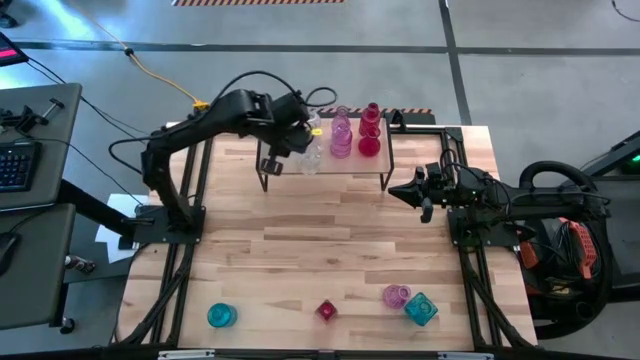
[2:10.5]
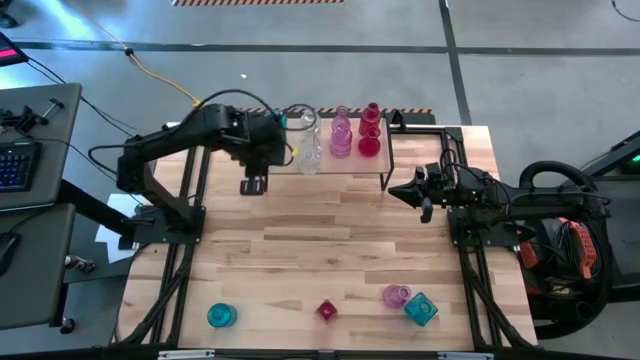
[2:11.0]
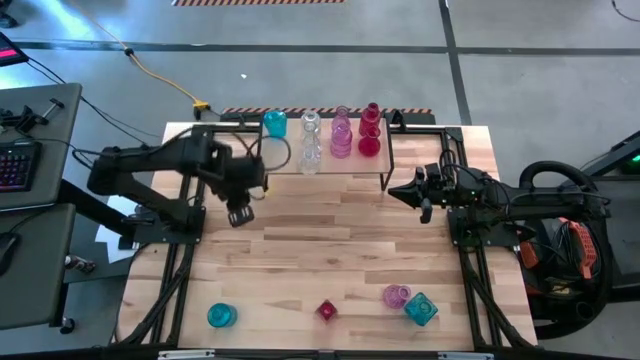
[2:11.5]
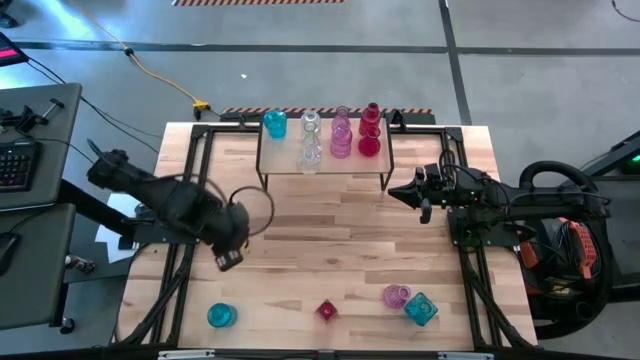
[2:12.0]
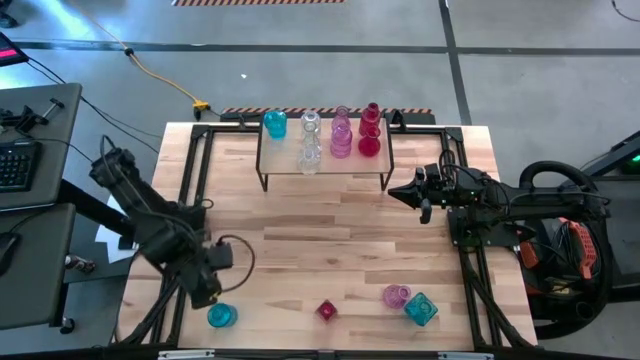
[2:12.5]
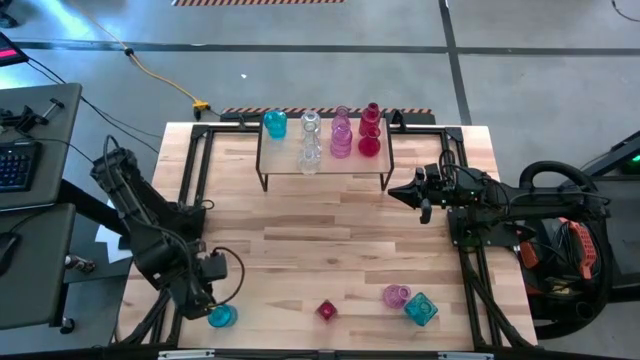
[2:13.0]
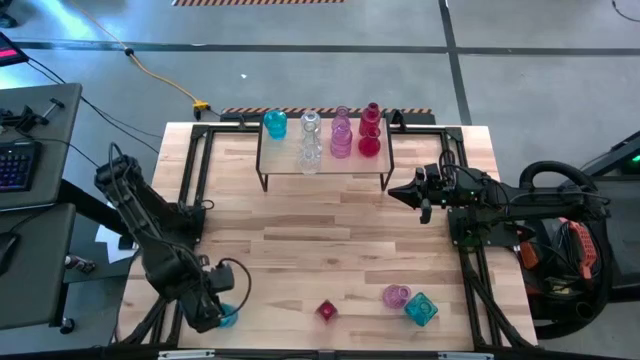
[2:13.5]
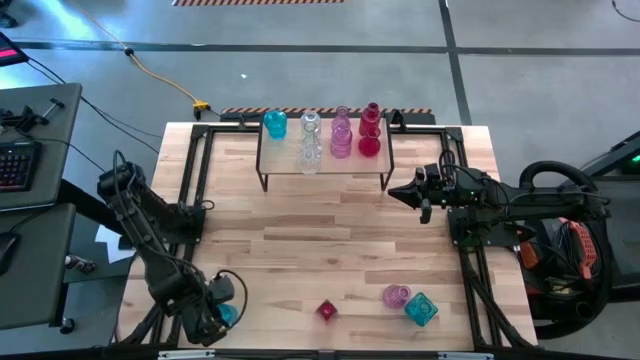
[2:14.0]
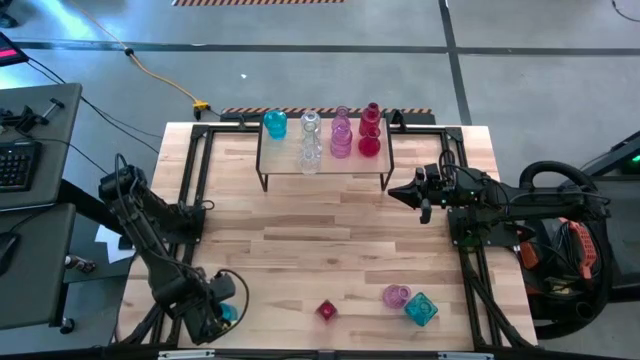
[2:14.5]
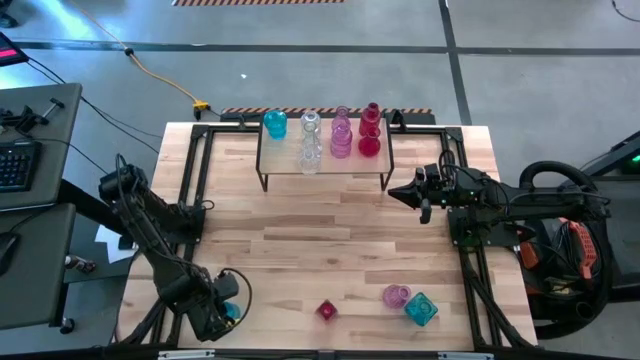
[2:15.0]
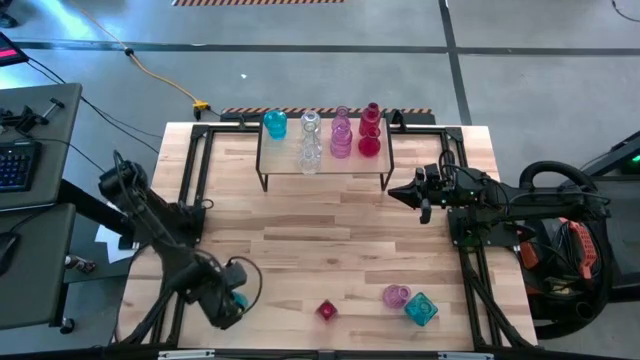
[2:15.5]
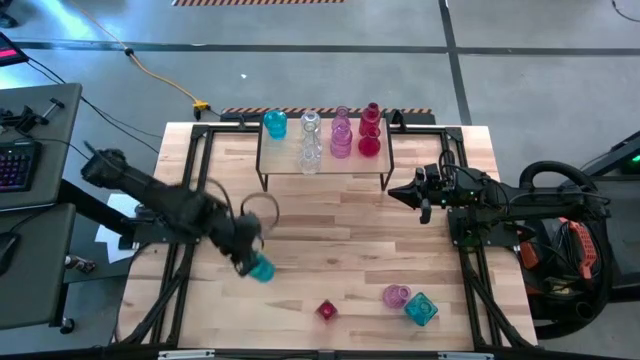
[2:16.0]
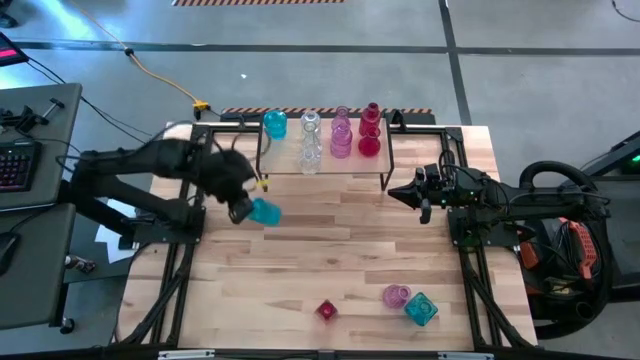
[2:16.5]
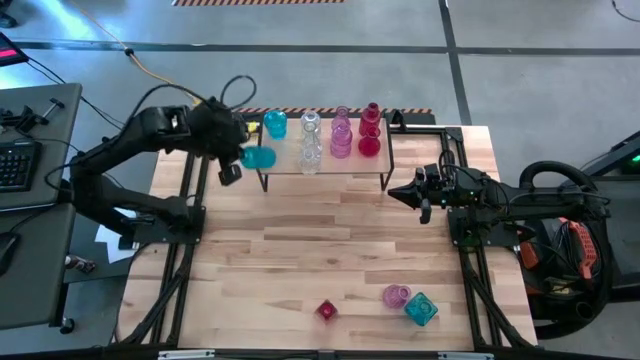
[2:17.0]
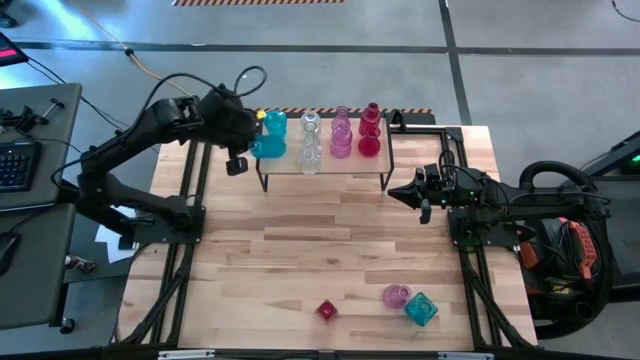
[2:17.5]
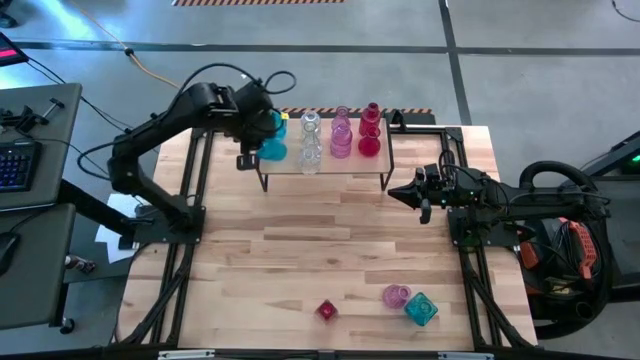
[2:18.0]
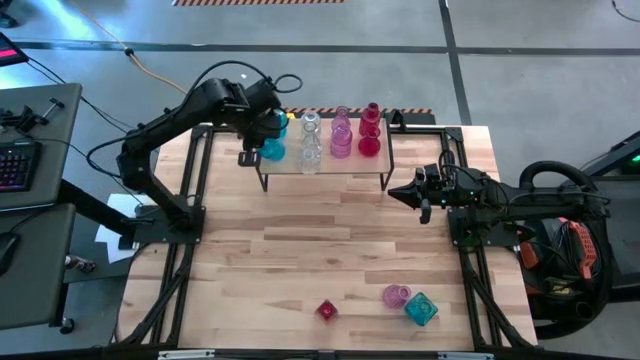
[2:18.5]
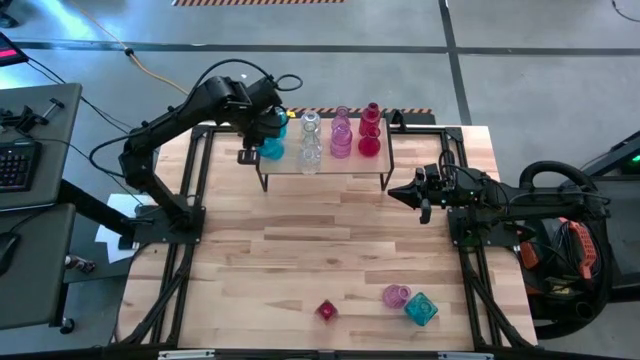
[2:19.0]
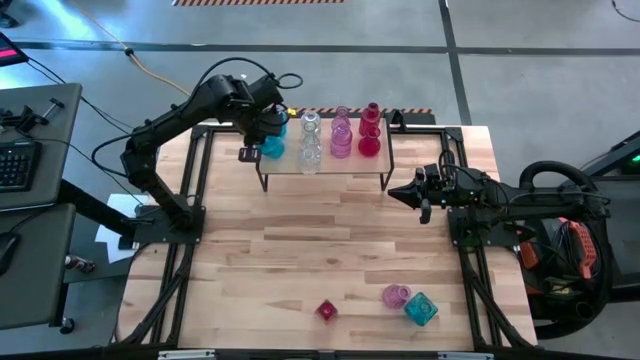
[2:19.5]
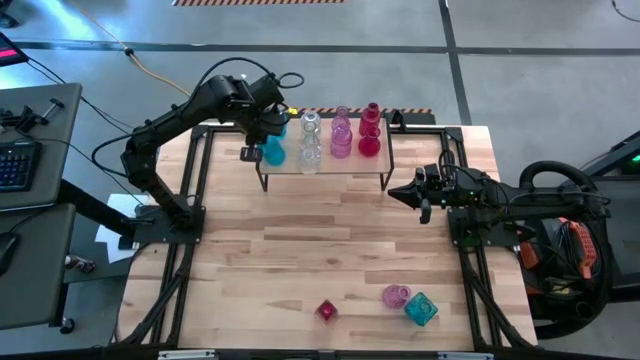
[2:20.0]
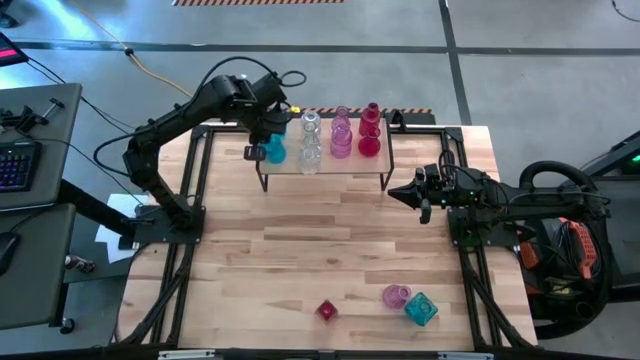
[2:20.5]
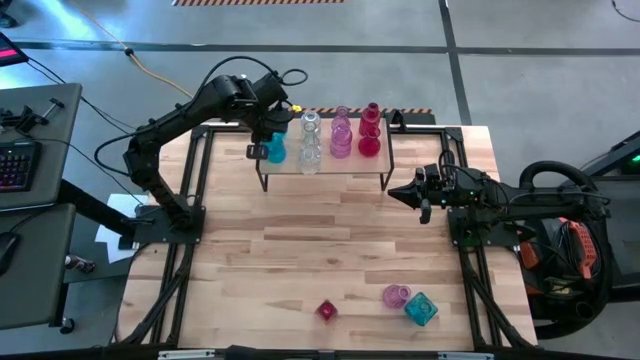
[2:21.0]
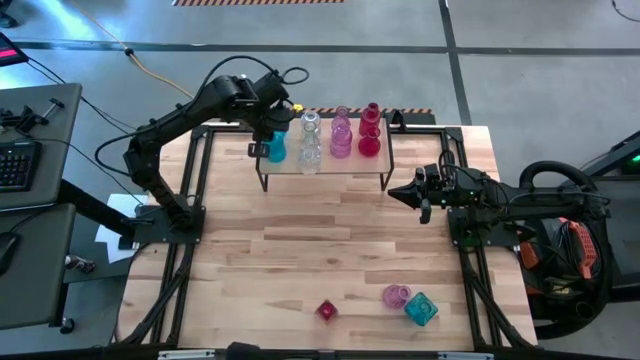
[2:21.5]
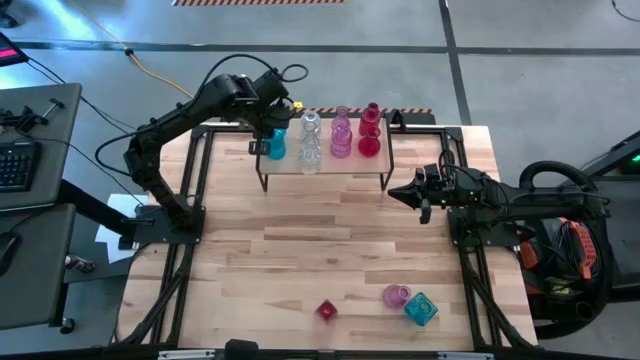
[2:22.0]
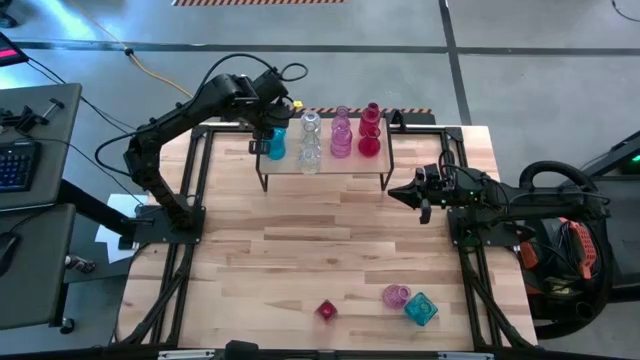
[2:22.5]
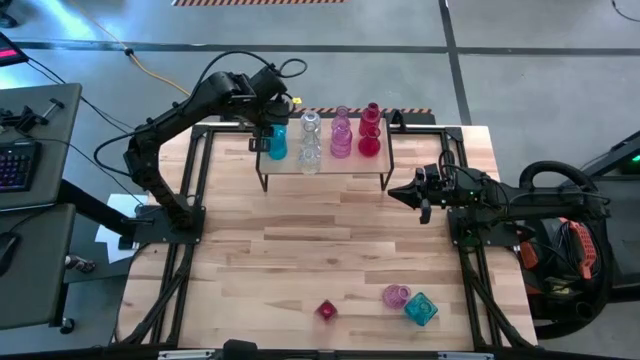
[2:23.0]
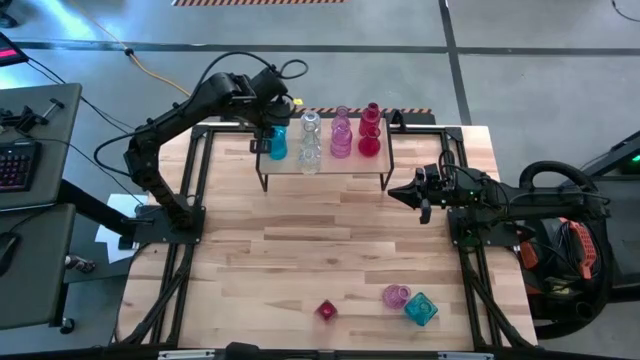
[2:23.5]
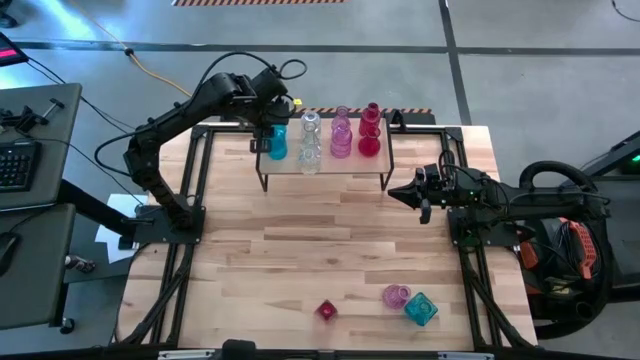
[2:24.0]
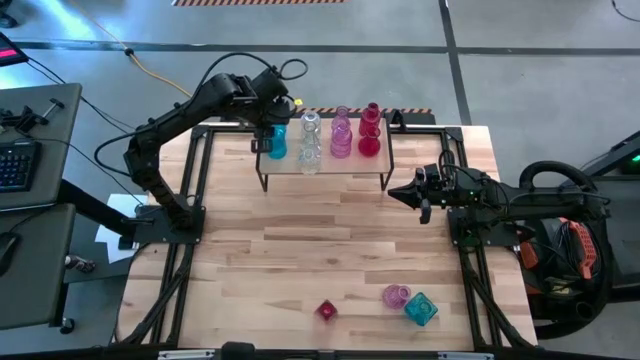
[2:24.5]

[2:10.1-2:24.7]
Task: sort vases onto shelf
Put the left blue vase on the shelf aligned with the other blue vase

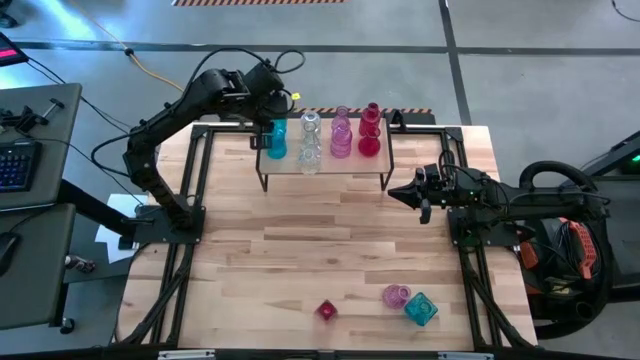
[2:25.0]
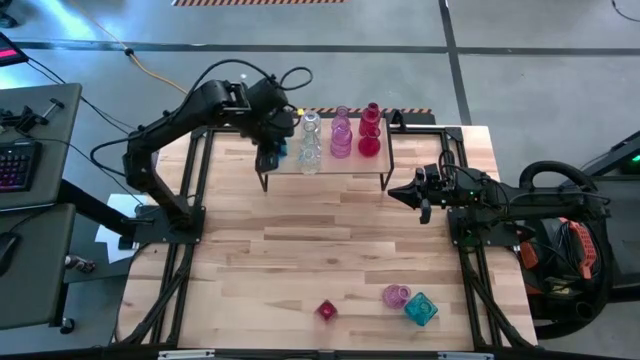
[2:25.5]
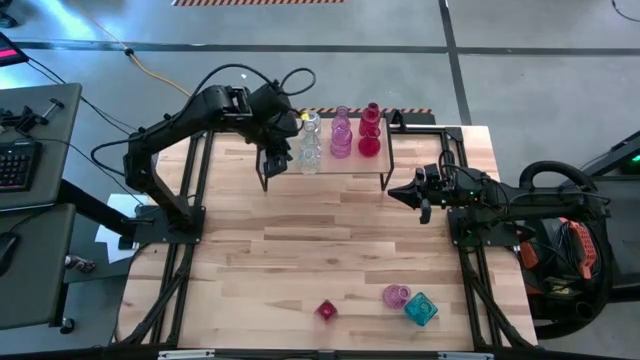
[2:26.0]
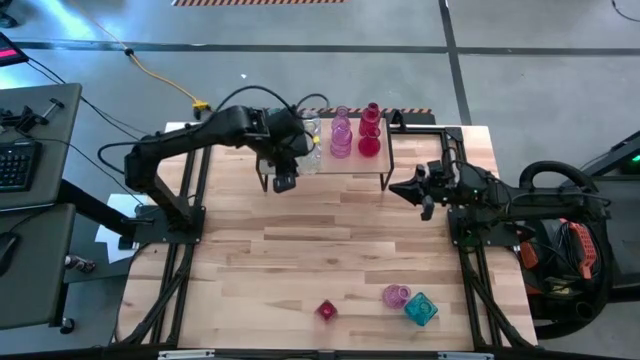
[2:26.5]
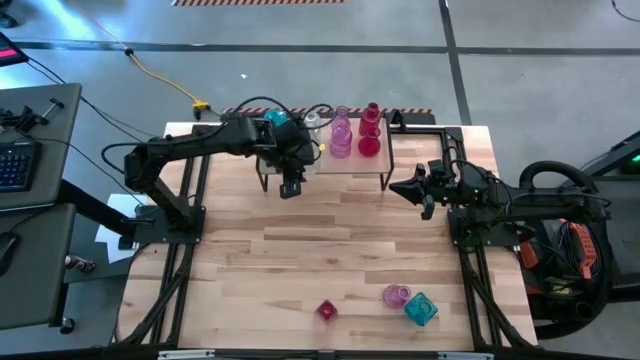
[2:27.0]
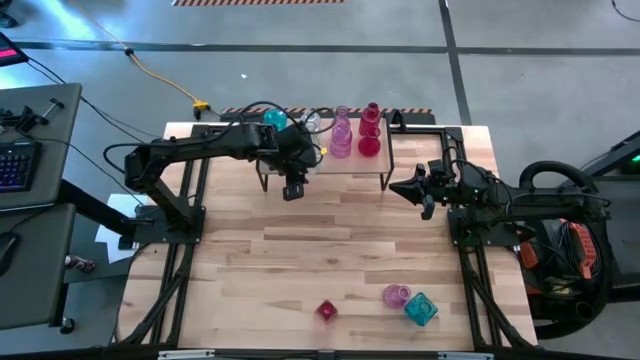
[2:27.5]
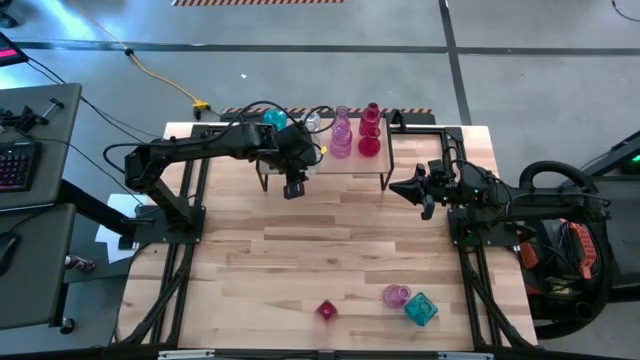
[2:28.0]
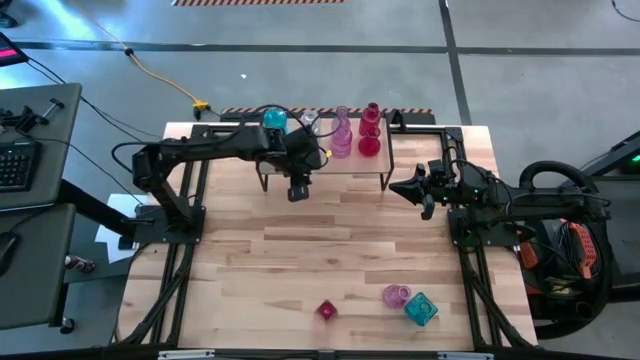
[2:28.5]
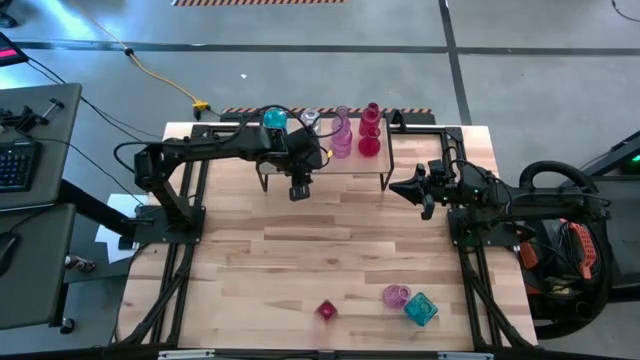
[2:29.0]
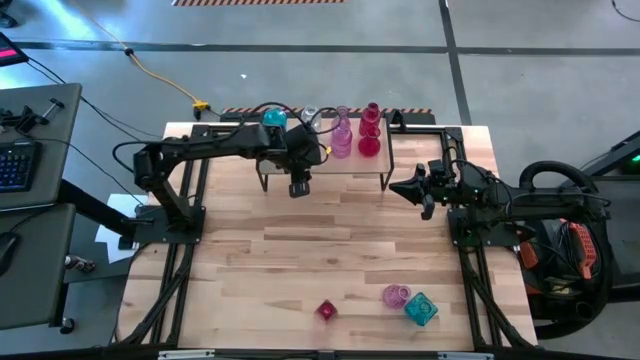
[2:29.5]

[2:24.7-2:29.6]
Adjust the transparent vase

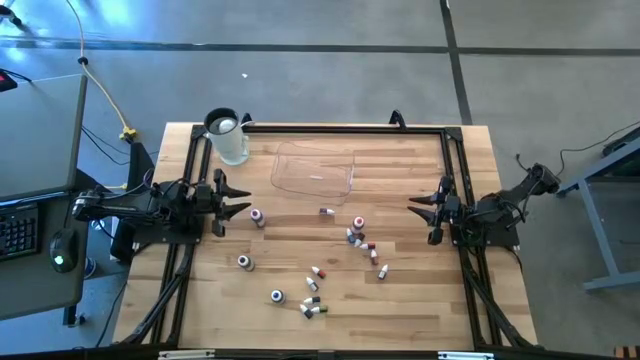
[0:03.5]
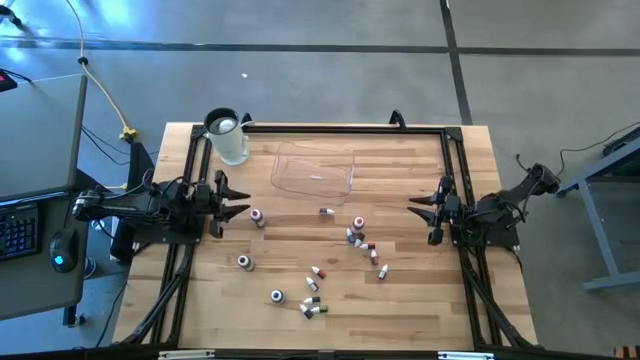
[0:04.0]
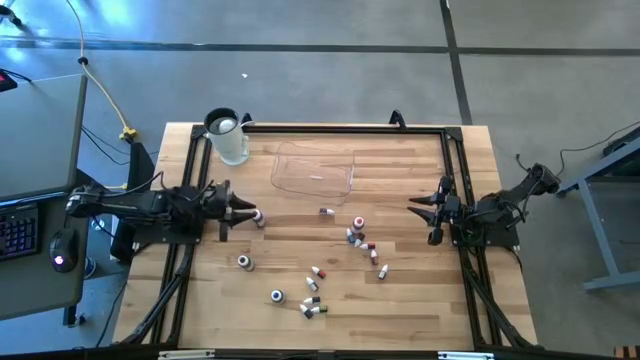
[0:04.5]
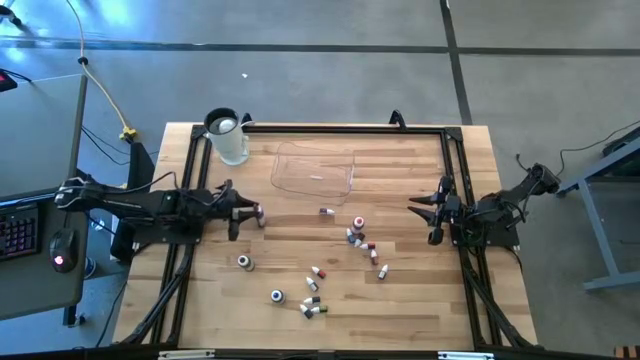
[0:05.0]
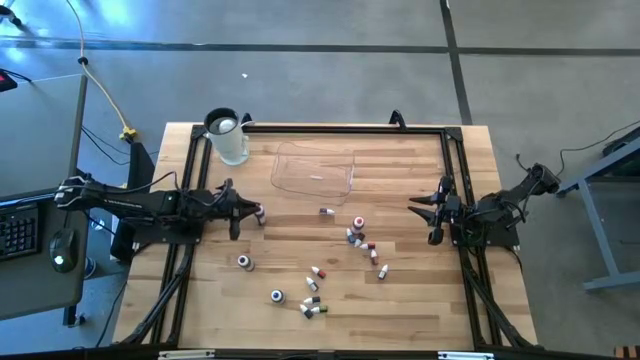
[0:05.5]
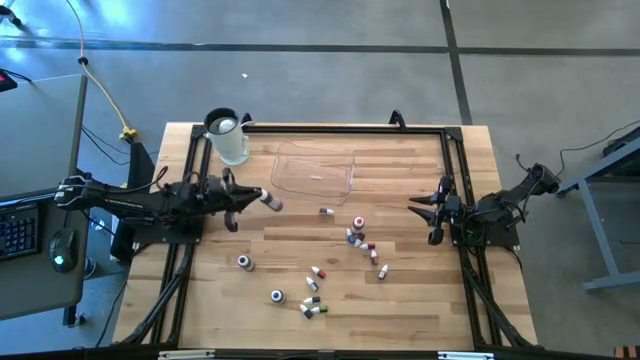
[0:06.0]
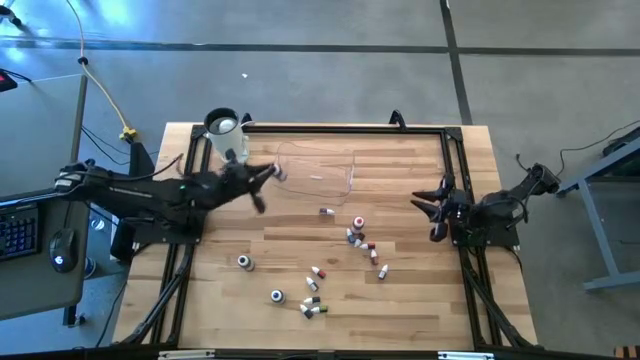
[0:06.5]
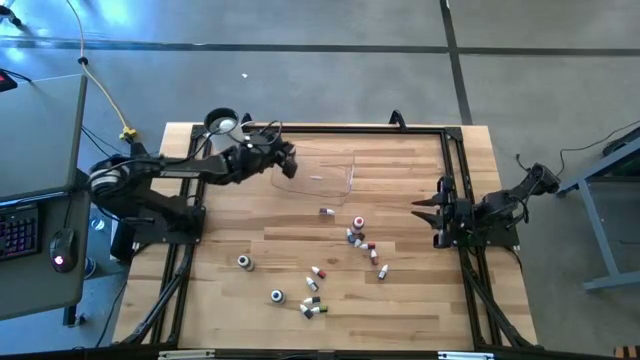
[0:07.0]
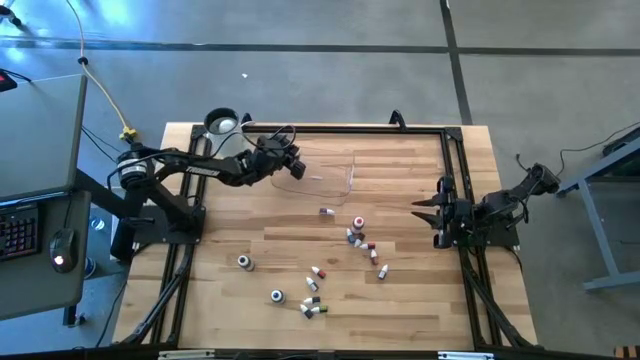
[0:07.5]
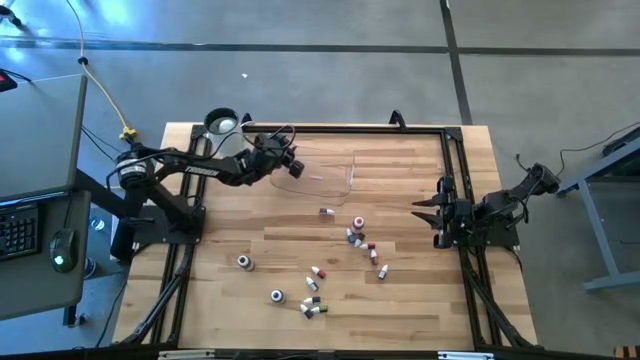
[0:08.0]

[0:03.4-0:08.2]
Task: Pick & Place food coloring
Put the large purple food coloring bottle into the bin
